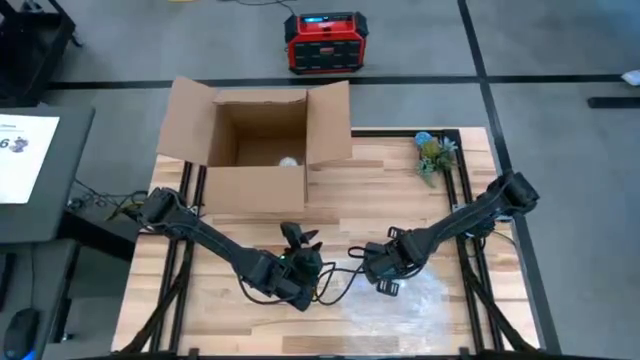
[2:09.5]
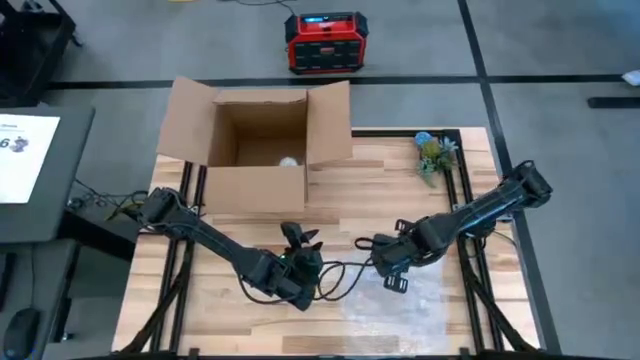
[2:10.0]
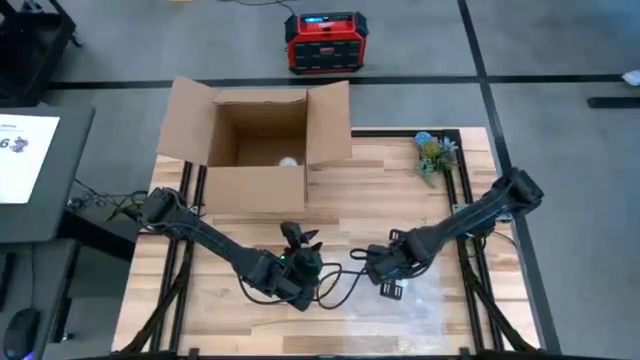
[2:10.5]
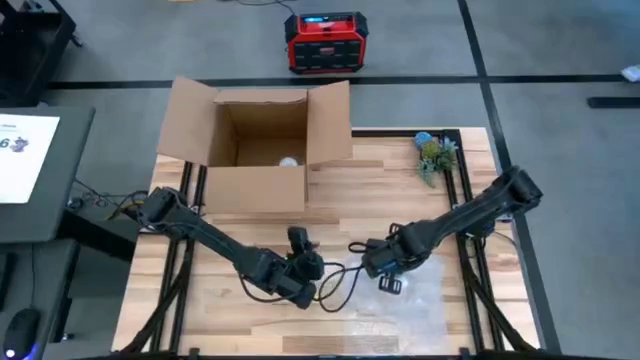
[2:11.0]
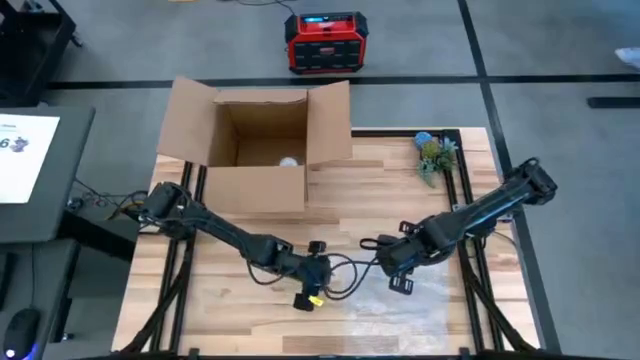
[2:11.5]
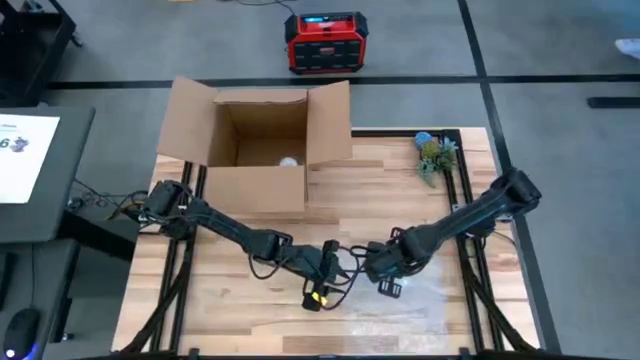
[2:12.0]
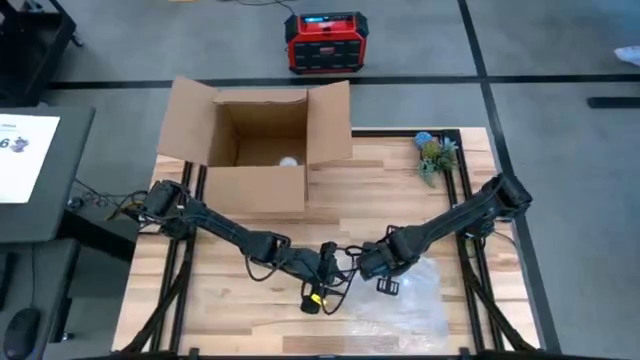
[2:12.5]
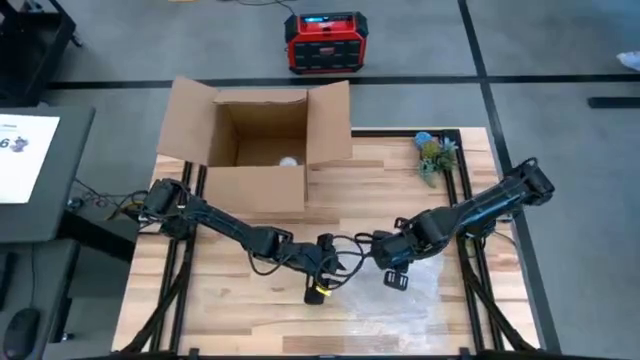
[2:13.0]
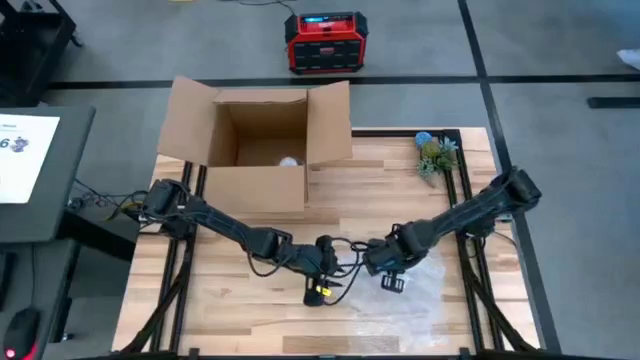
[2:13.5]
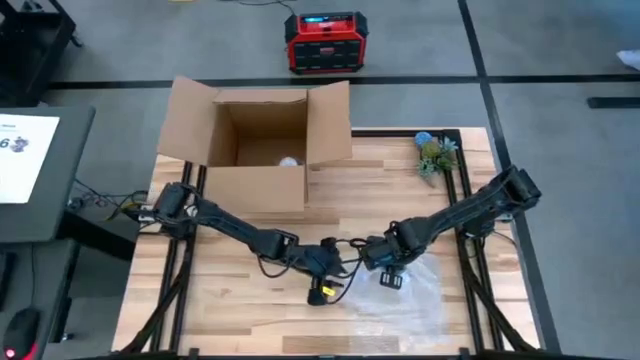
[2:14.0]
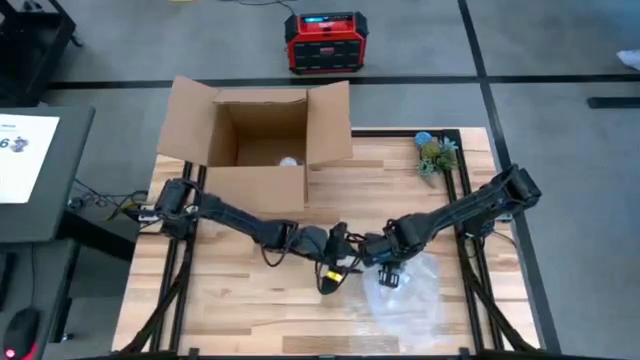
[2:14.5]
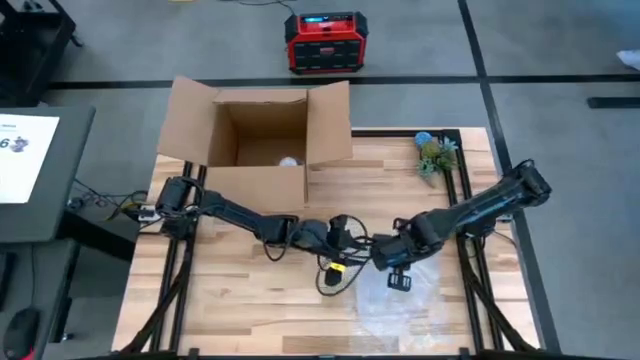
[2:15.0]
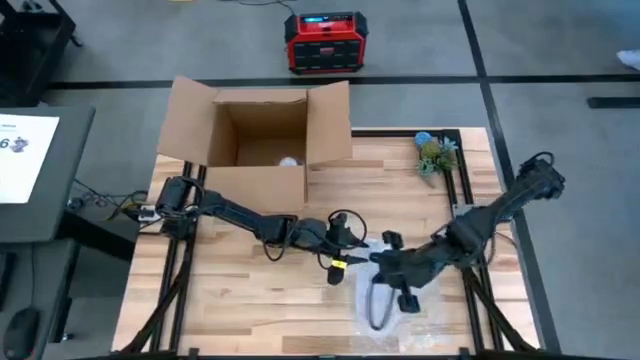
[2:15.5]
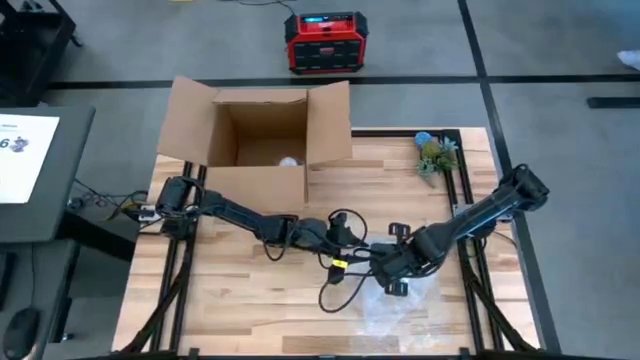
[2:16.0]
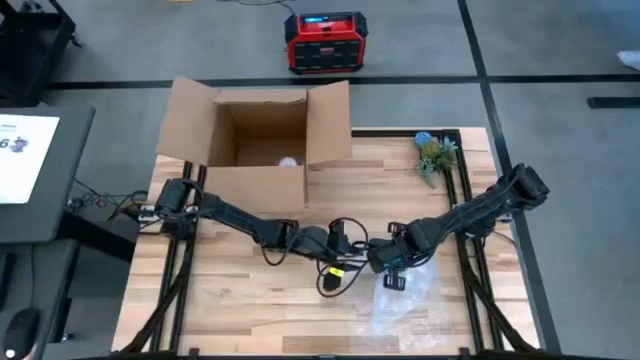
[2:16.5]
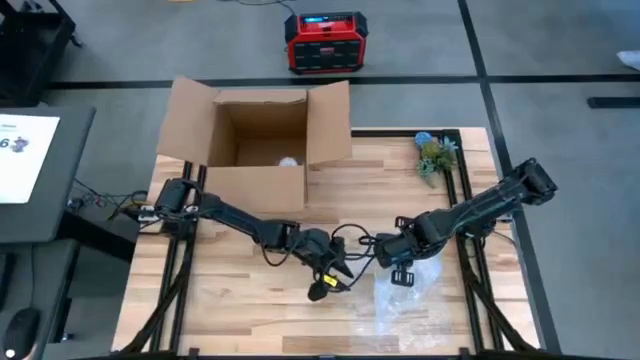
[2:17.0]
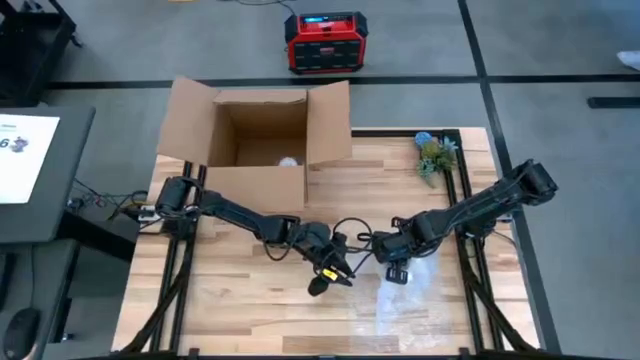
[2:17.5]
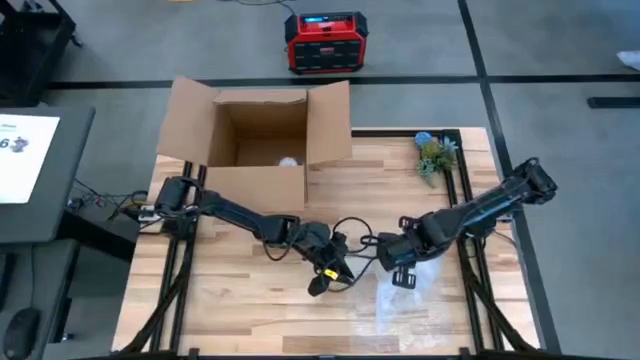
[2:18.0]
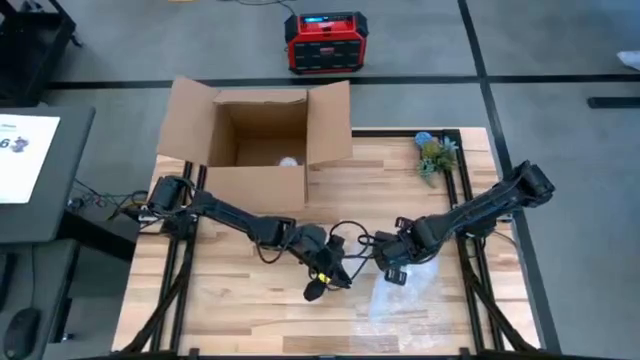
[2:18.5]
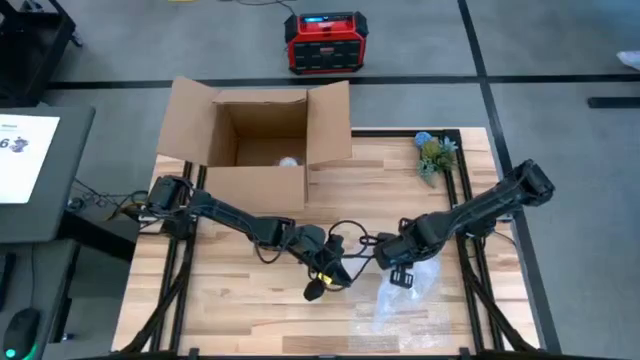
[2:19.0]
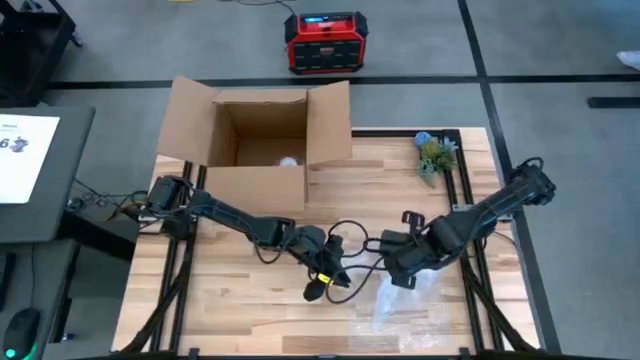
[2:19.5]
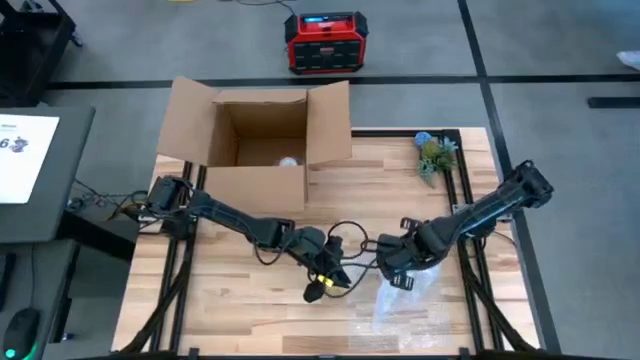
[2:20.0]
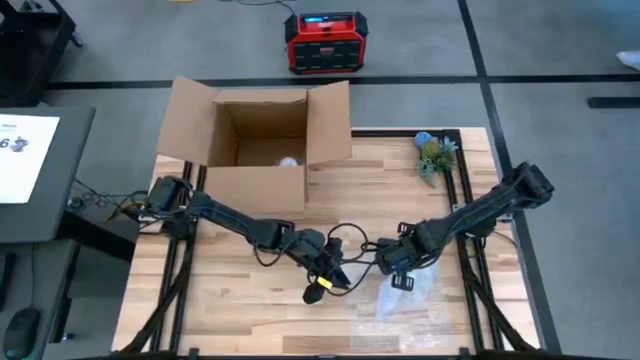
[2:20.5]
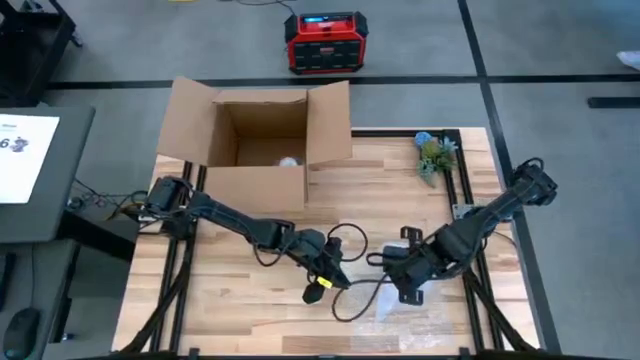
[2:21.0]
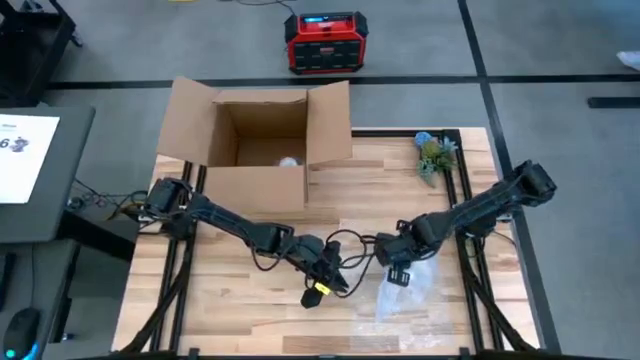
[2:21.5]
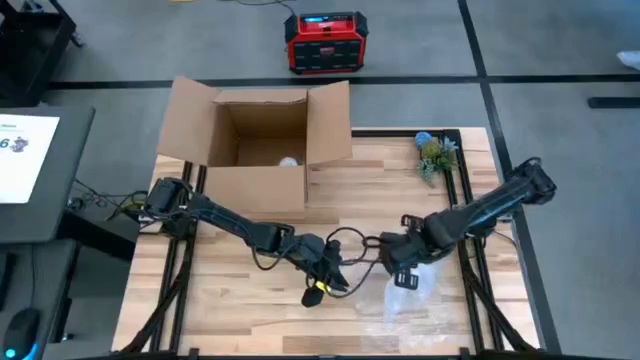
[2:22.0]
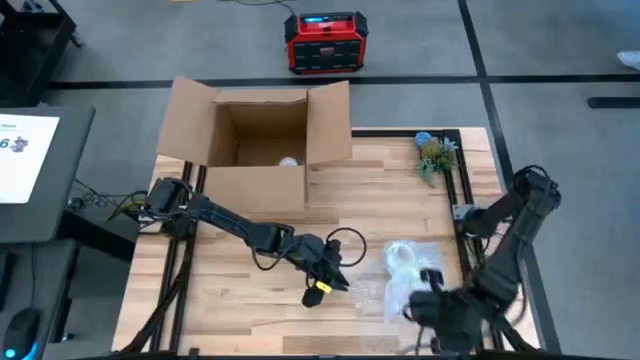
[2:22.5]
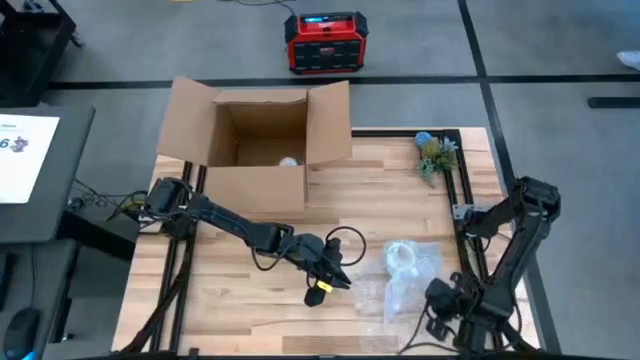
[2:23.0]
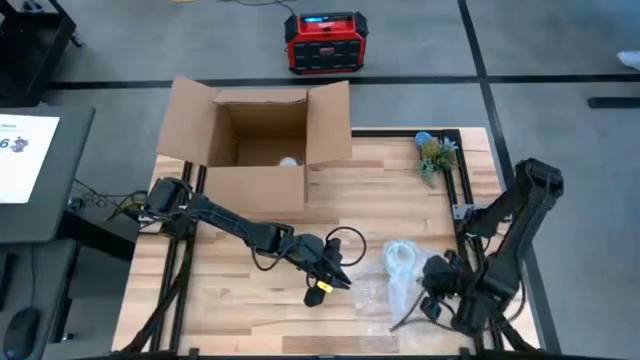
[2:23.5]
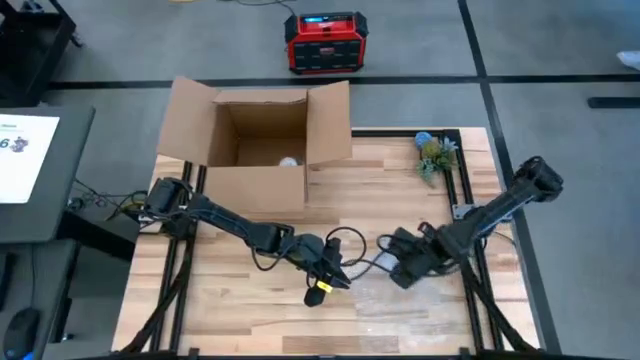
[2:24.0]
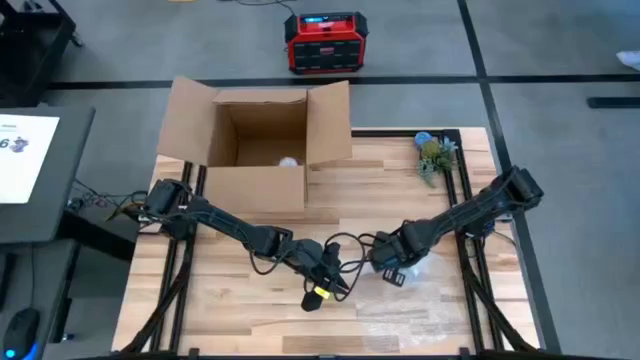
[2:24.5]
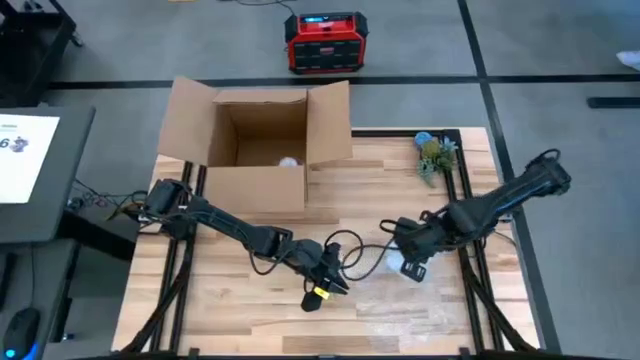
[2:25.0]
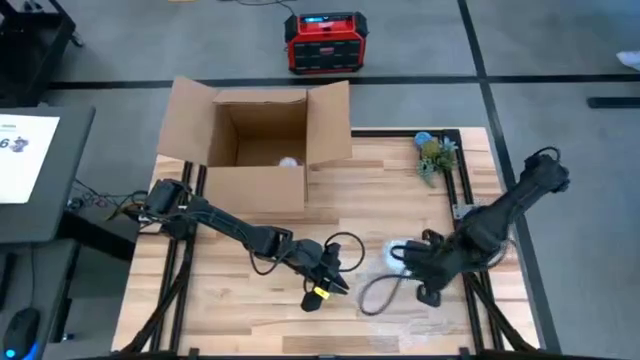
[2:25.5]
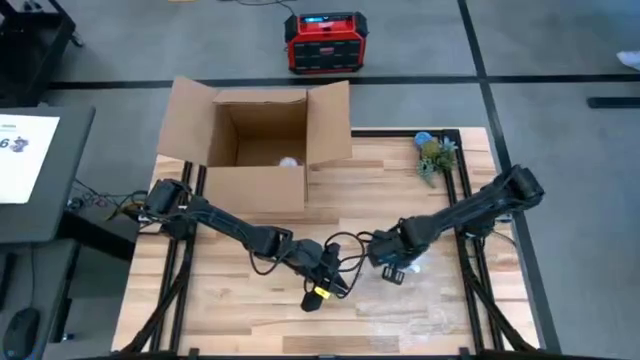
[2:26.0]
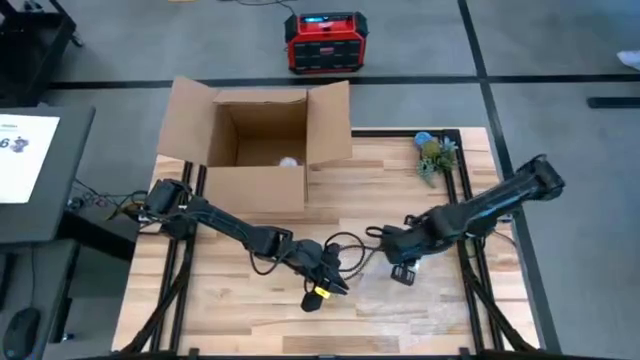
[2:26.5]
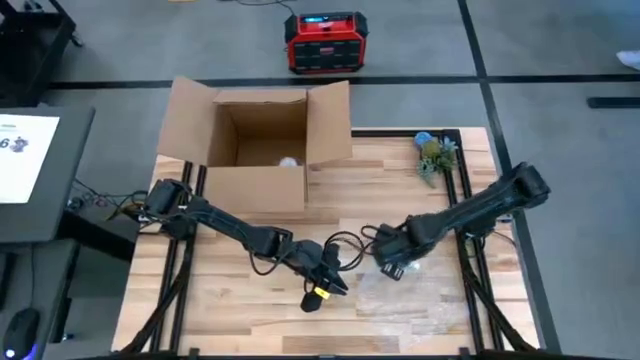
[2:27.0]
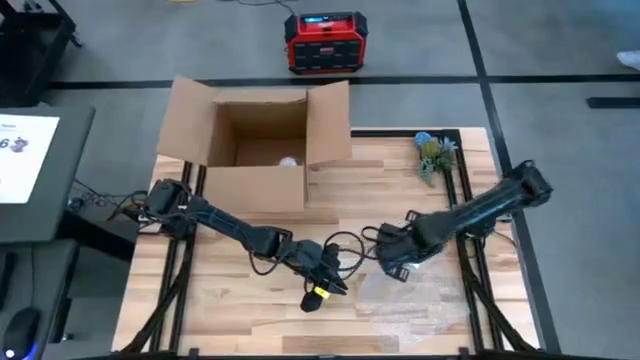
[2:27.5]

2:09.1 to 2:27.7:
Task: wrap mug
Wrap the green mug with bubble wrap

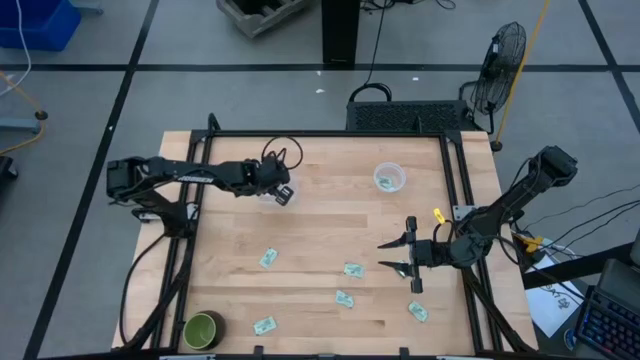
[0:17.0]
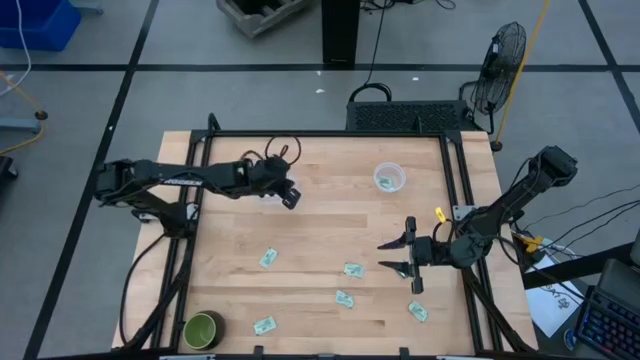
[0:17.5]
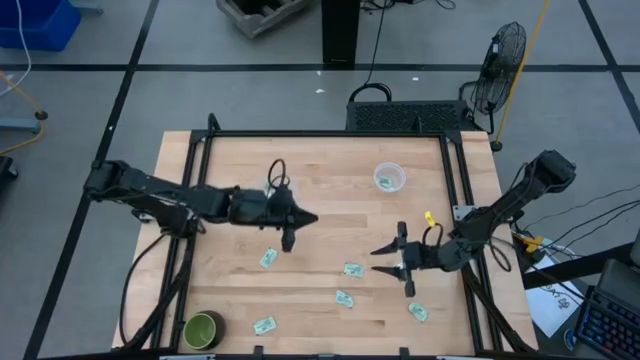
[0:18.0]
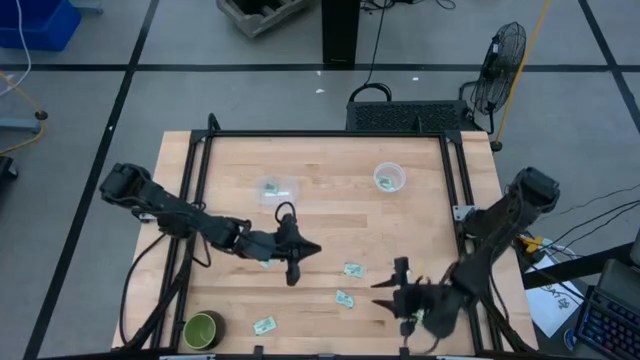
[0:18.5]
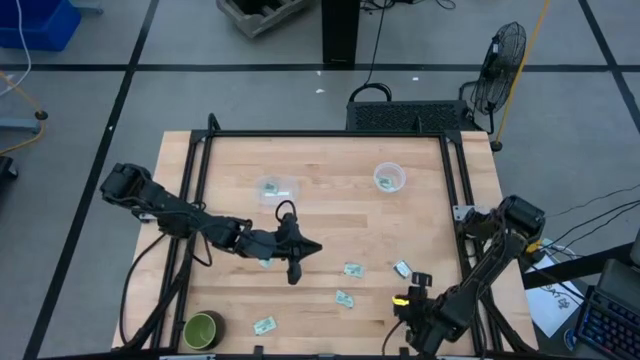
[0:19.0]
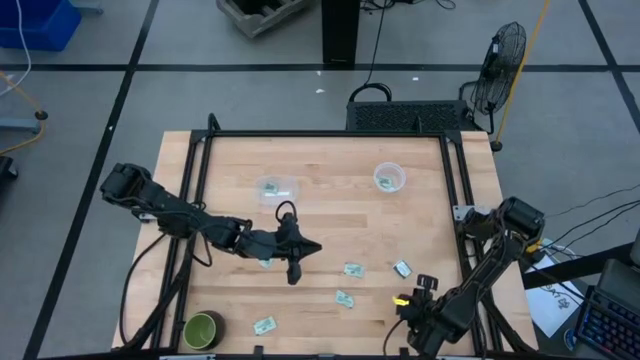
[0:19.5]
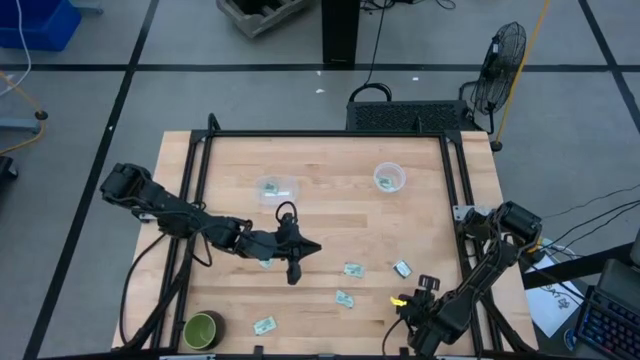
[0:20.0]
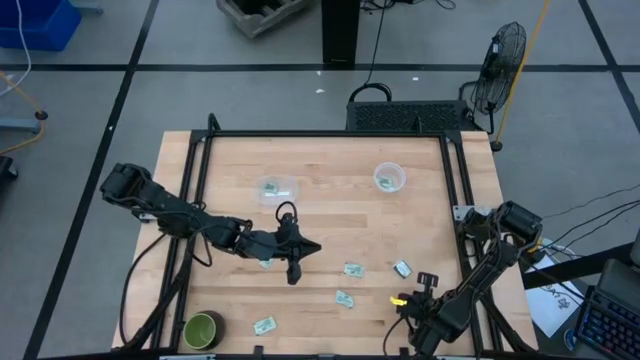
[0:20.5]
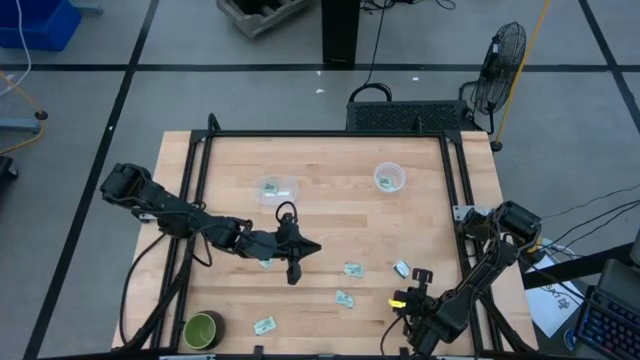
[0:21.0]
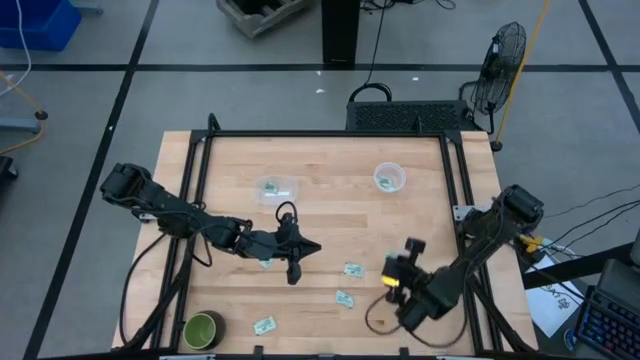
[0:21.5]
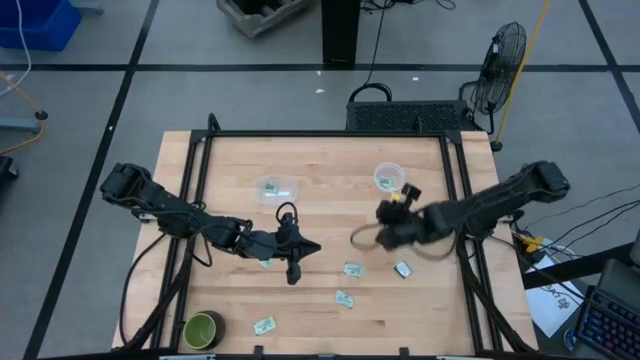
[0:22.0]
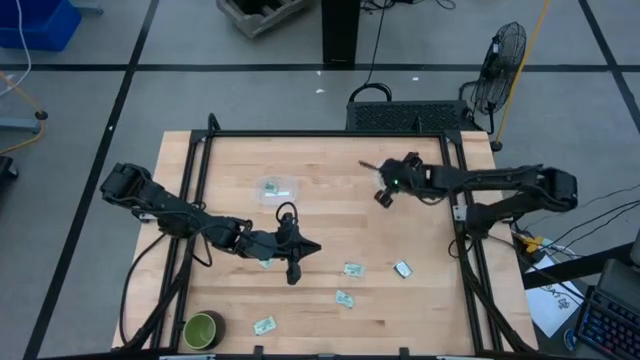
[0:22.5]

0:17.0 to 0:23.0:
Task: Pick and place items into bin
Put the stevia packet into the right transparent bin
